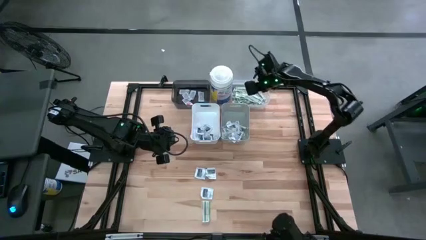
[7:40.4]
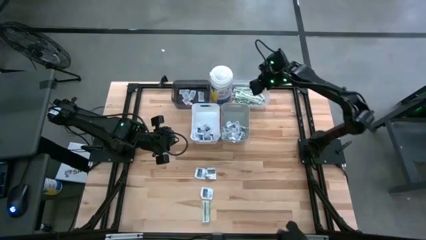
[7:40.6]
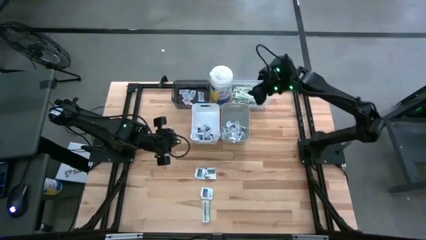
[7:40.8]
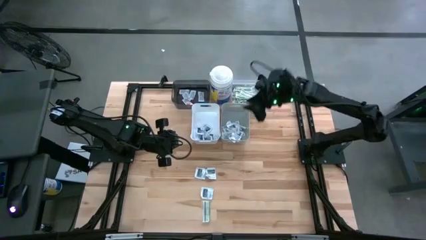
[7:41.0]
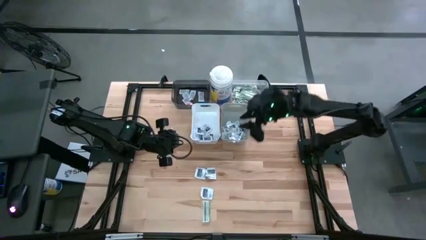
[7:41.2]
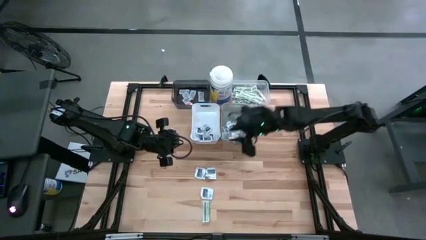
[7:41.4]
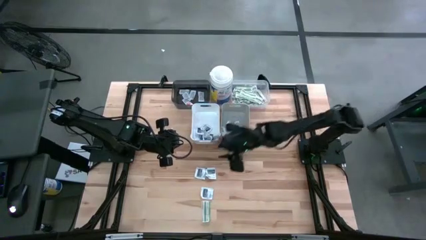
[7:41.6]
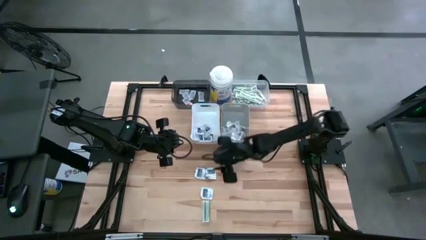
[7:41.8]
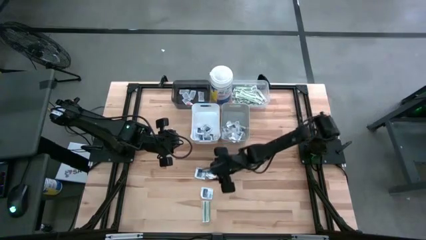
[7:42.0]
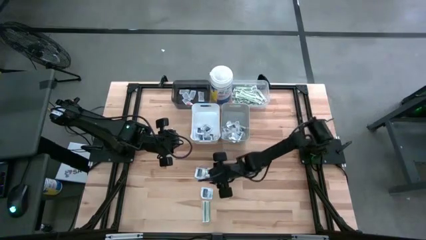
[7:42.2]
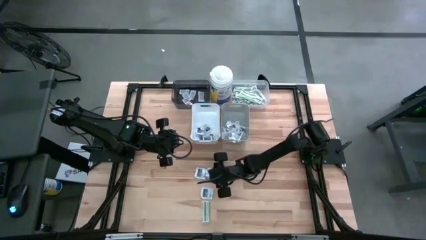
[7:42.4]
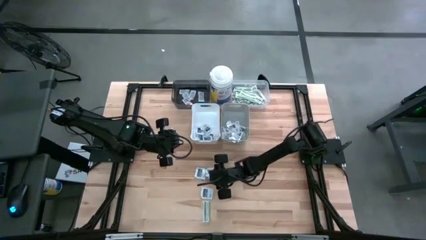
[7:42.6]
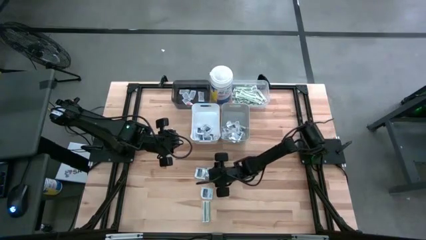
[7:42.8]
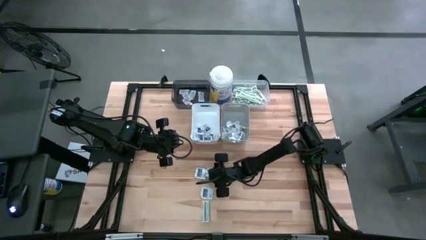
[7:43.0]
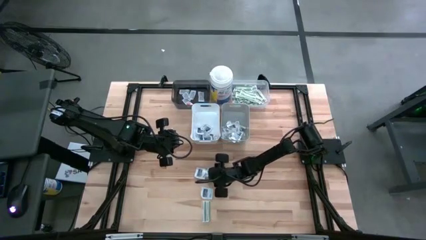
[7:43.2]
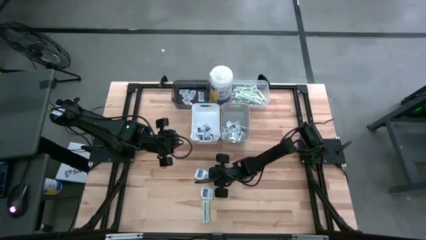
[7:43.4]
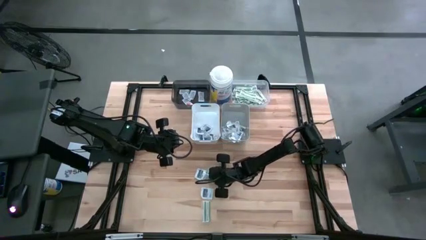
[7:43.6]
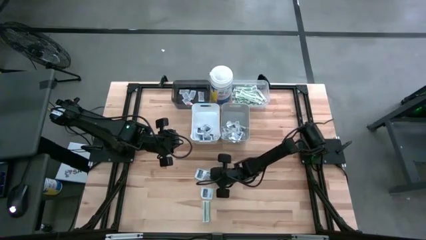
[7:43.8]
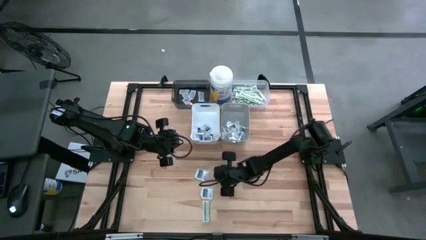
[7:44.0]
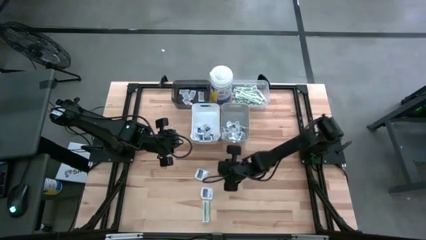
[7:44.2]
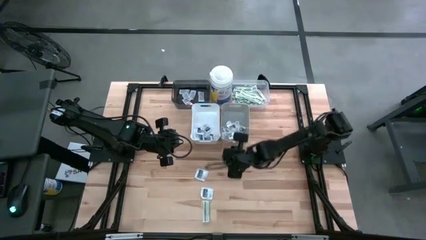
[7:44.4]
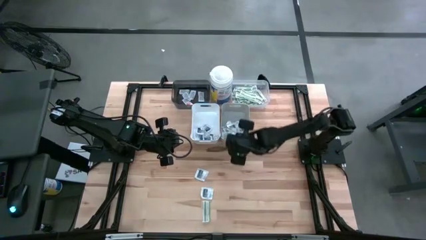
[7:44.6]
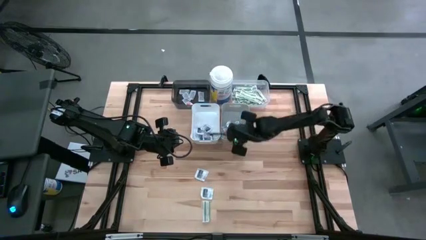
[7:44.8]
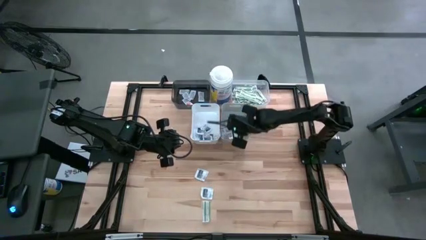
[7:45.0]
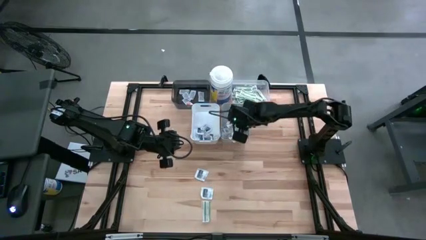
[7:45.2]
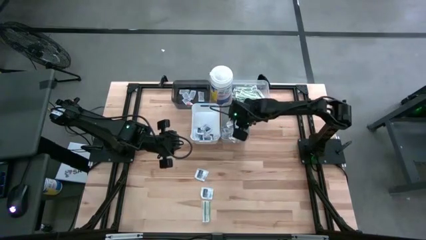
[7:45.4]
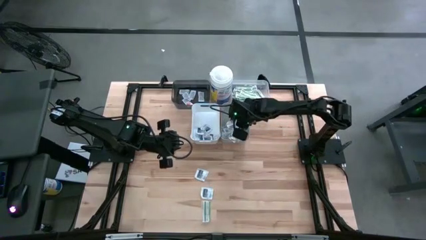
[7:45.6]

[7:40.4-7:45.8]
Task: Pick & Place First Aid Supplies
Put the wipe into the gray bin

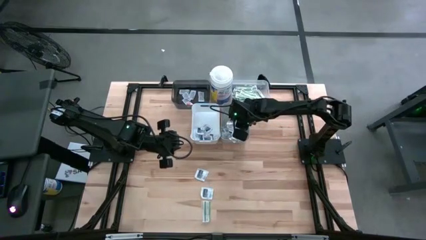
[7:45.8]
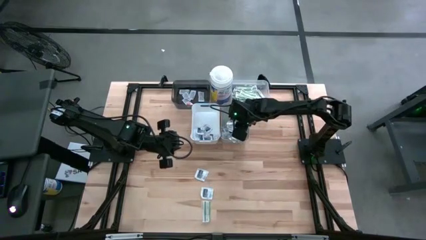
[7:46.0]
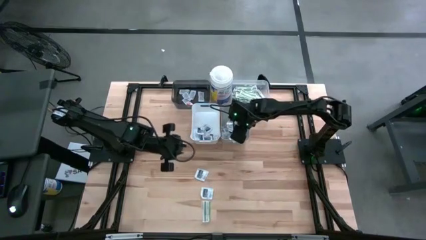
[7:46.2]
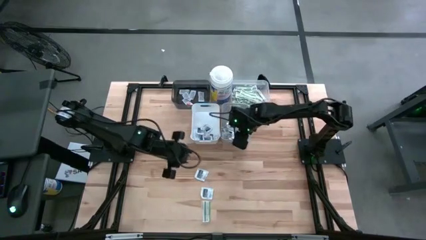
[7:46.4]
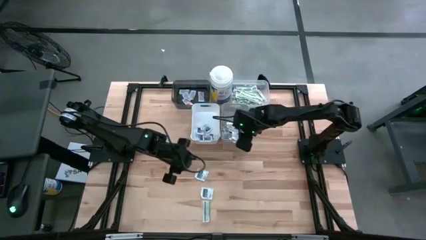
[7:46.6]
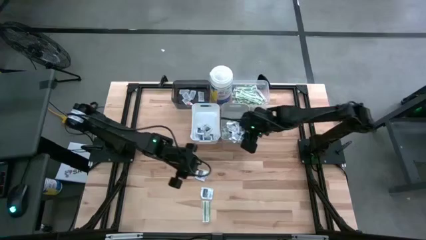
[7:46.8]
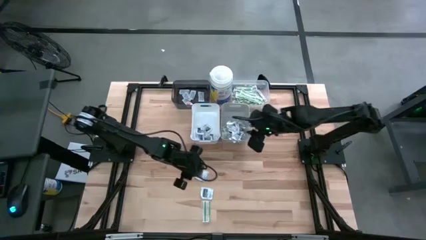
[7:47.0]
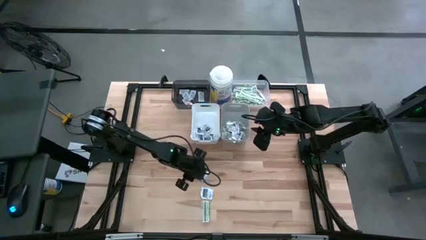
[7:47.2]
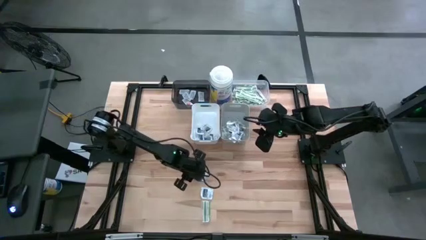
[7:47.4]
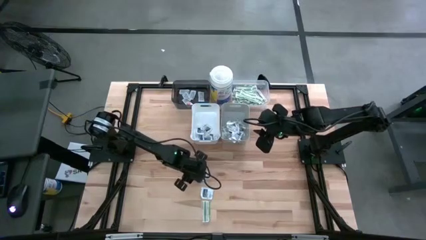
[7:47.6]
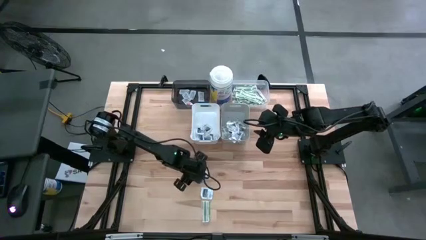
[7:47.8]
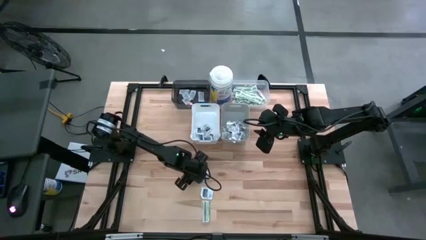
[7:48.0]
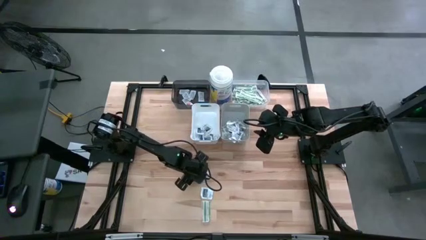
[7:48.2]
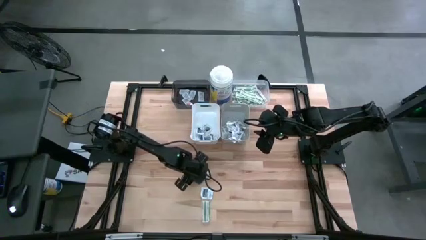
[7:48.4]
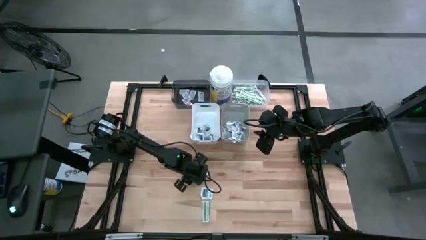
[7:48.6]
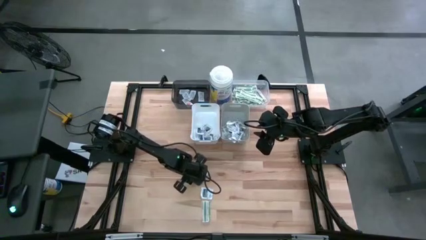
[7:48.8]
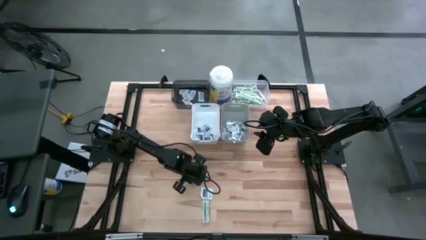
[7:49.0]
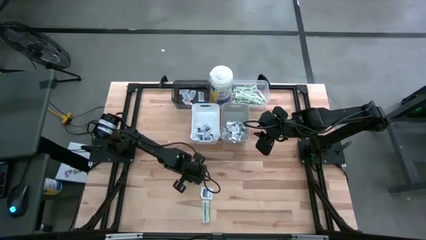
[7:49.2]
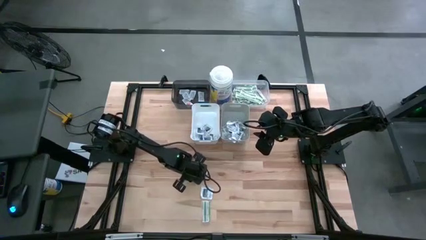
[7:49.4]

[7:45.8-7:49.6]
Put the wipe into the gray bin

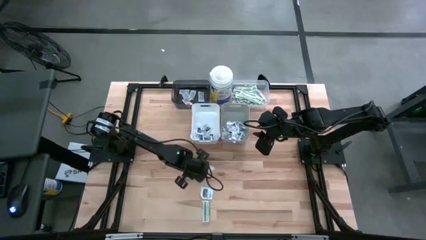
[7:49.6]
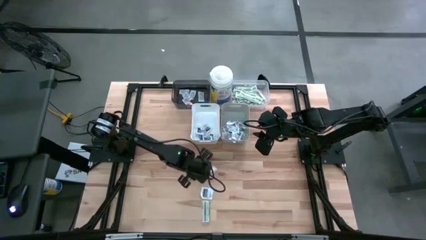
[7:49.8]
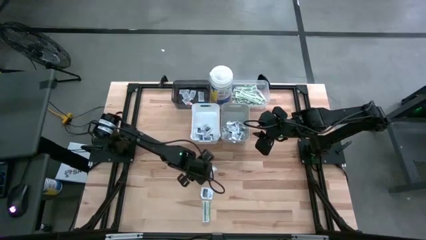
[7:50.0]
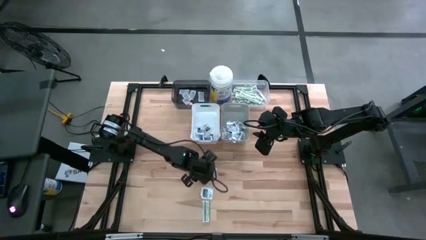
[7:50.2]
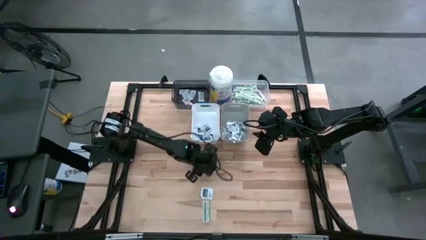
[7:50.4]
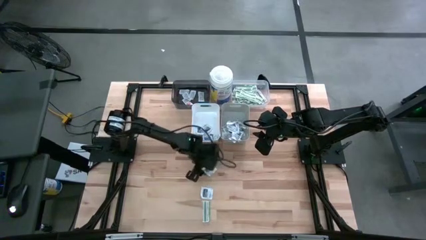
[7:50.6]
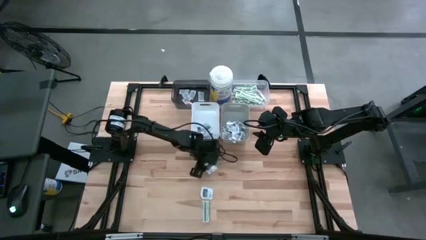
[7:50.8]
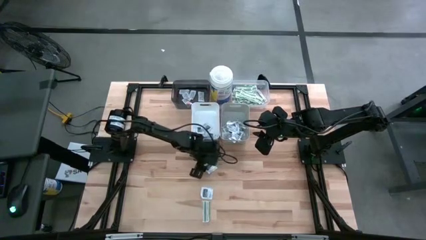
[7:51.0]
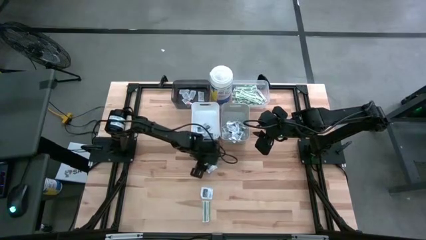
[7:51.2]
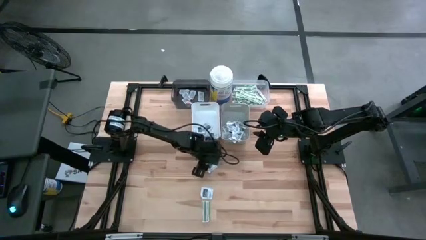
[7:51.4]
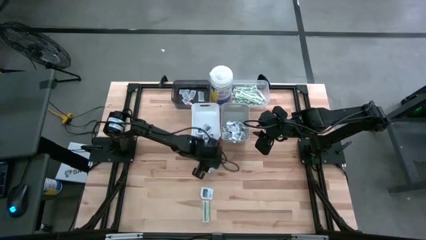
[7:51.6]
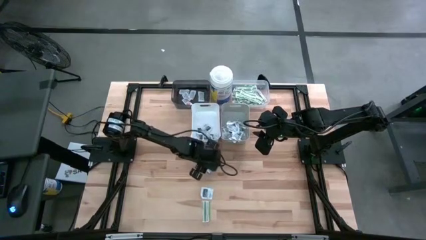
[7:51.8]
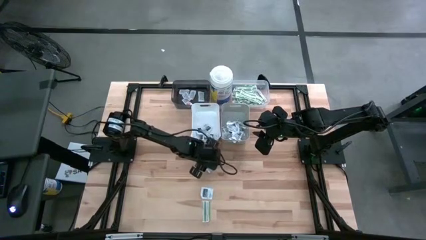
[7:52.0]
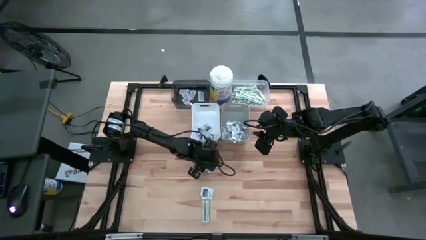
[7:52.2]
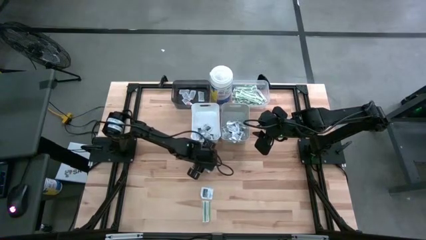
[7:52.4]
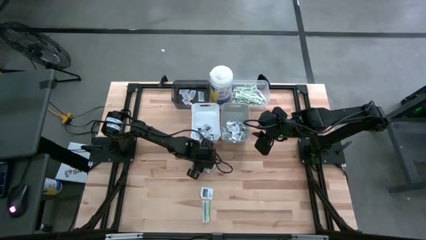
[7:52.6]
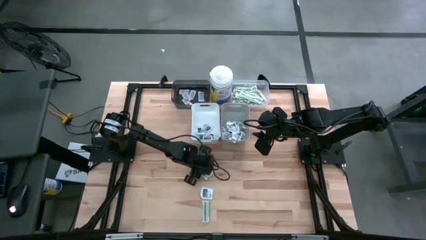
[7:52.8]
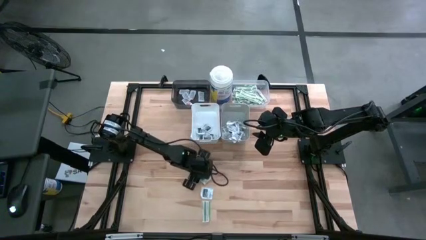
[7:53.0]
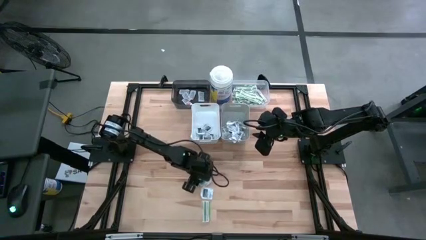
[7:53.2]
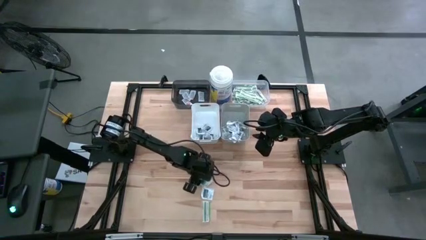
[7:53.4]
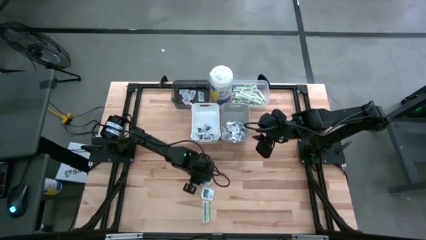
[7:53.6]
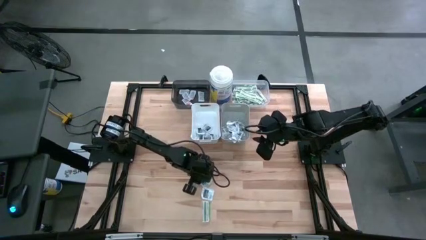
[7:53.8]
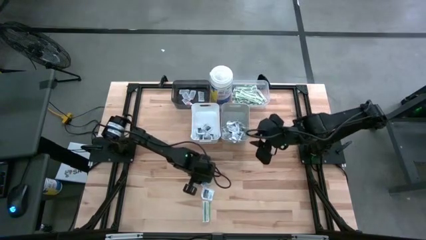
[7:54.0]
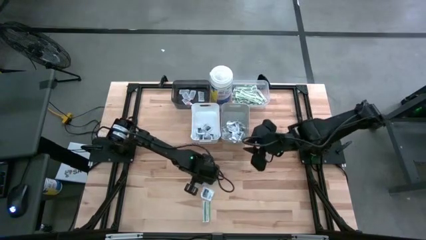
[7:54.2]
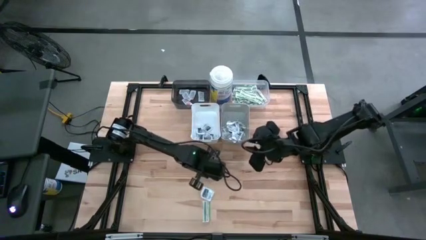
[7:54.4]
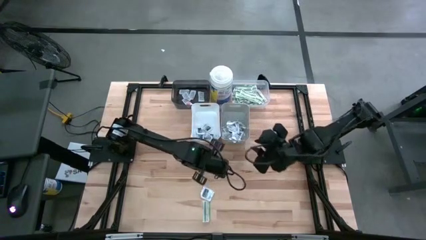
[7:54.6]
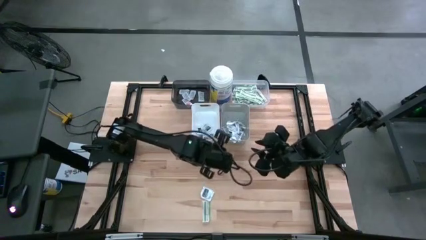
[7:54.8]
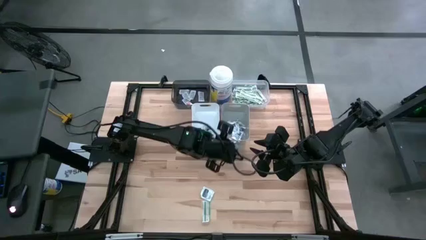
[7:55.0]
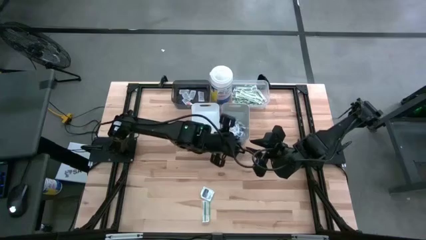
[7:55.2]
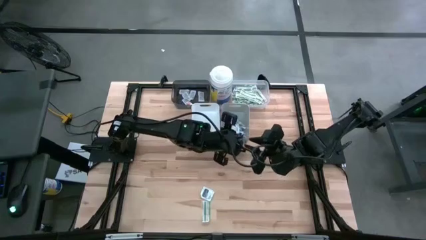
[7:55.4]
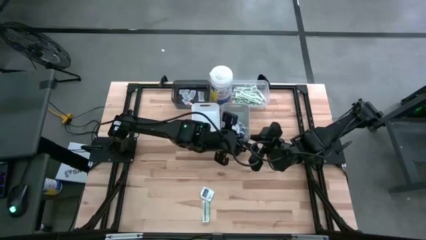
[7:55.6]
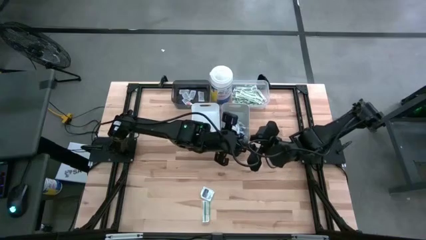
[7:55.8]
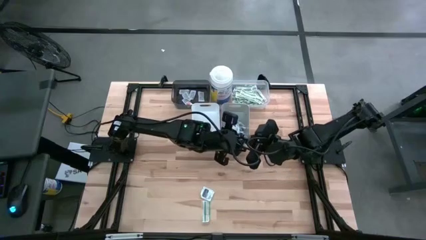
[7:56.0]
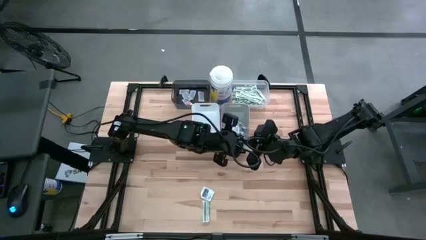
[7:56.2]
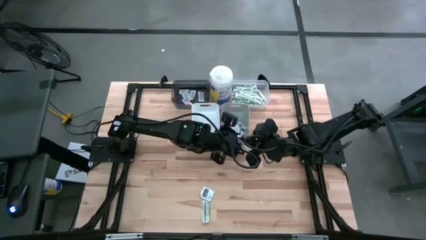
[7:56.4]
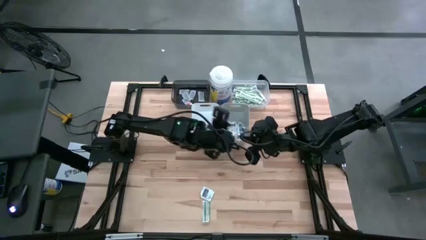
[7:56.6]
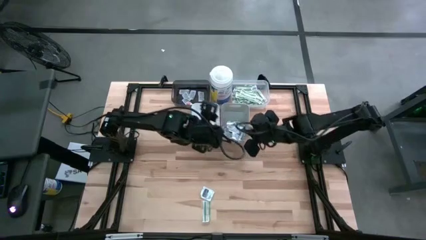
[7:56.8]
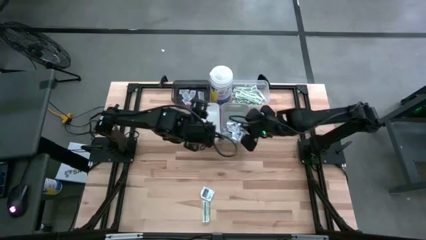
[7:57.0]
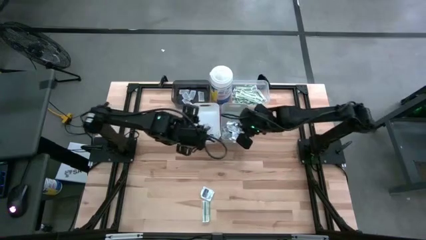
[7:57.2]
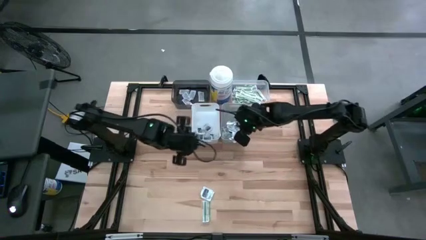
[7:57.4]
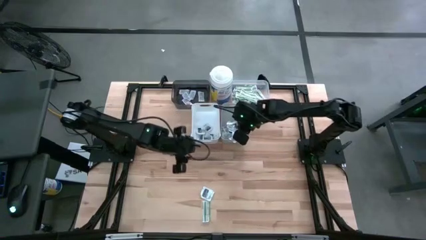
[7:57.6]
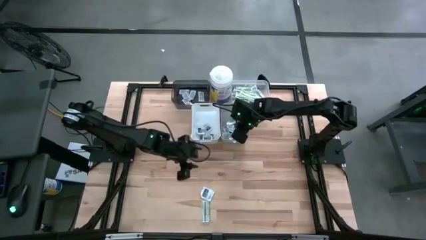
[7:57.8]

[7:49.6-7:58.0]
Put the wipe into the gray bin
